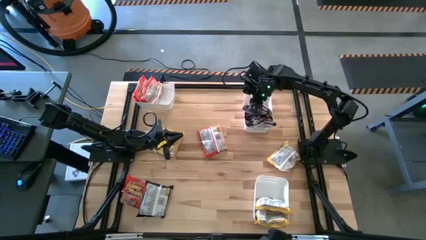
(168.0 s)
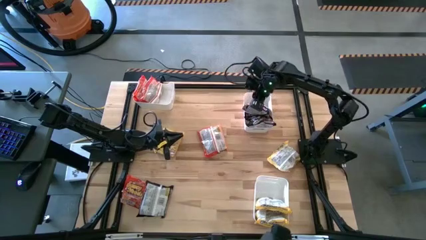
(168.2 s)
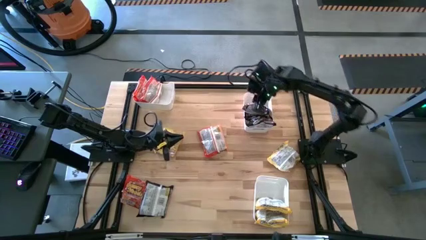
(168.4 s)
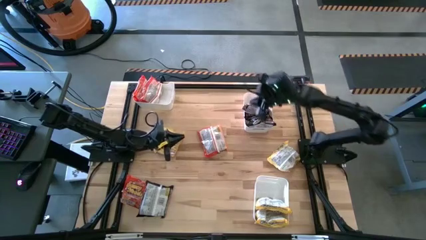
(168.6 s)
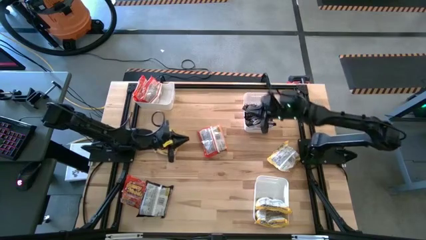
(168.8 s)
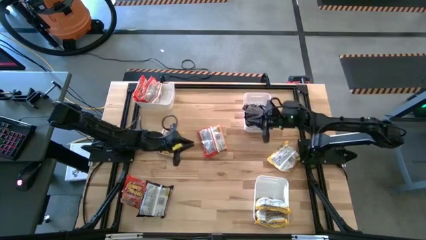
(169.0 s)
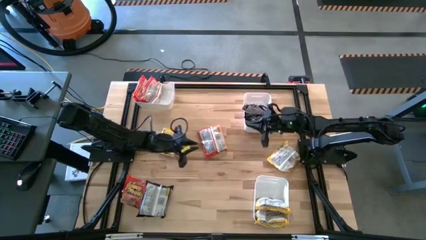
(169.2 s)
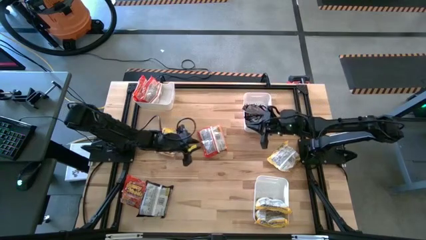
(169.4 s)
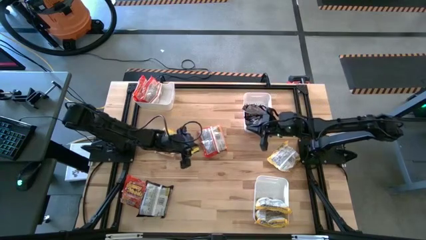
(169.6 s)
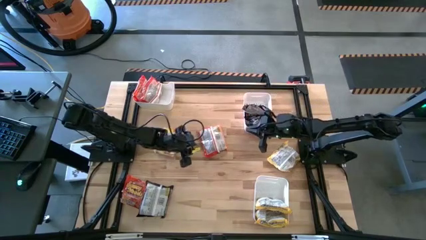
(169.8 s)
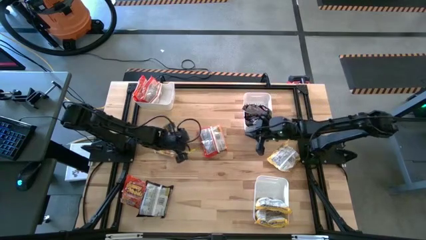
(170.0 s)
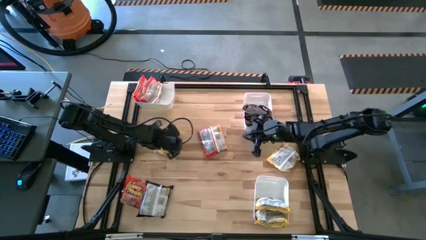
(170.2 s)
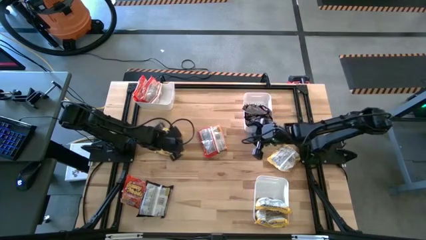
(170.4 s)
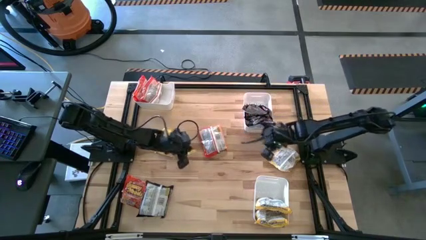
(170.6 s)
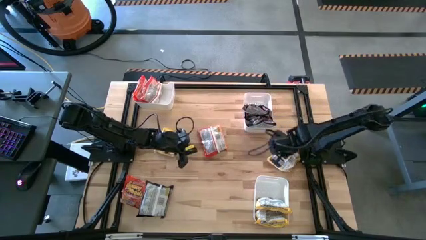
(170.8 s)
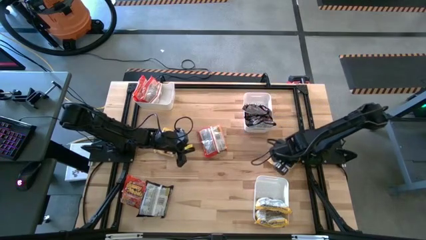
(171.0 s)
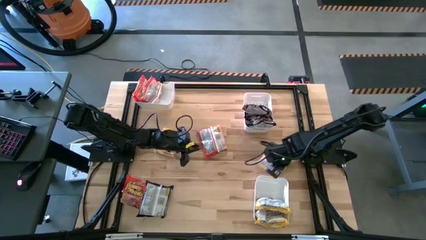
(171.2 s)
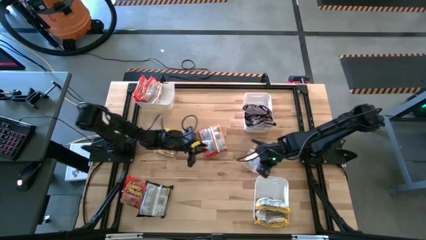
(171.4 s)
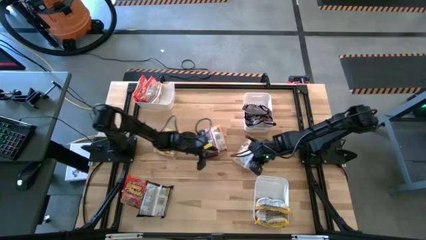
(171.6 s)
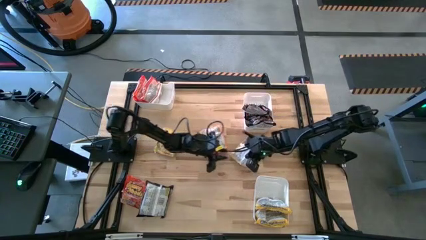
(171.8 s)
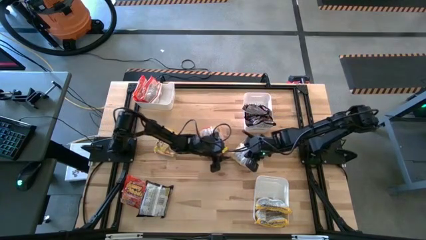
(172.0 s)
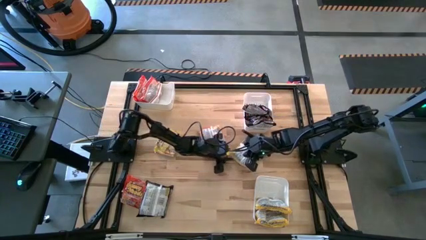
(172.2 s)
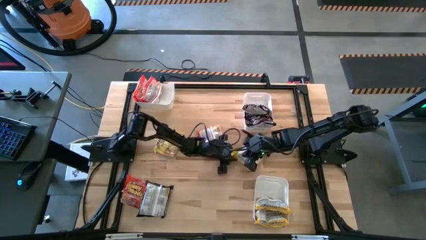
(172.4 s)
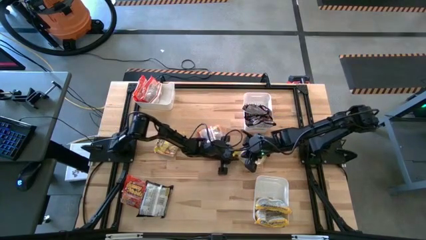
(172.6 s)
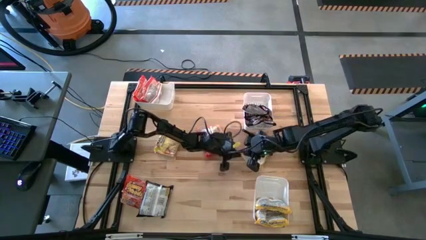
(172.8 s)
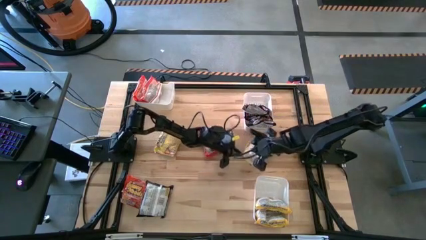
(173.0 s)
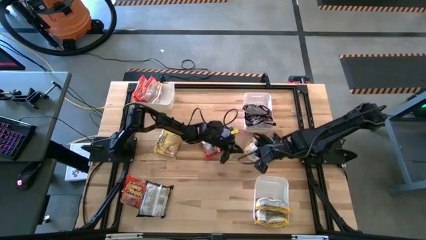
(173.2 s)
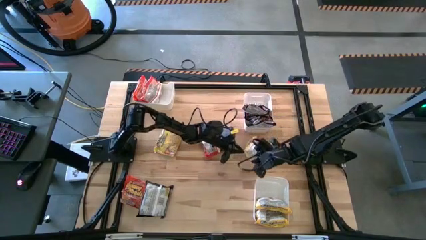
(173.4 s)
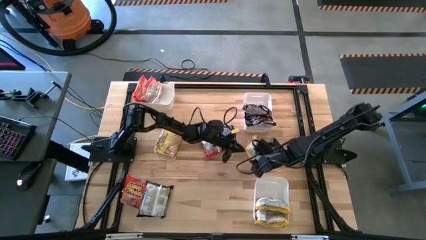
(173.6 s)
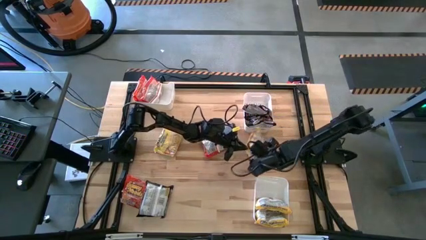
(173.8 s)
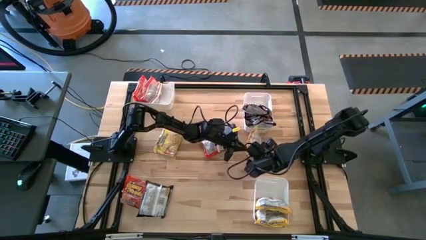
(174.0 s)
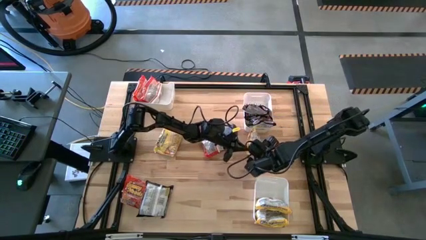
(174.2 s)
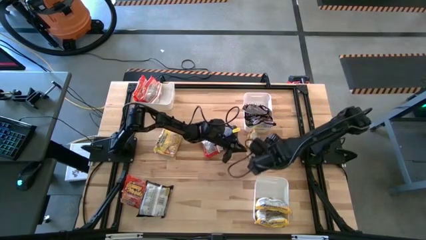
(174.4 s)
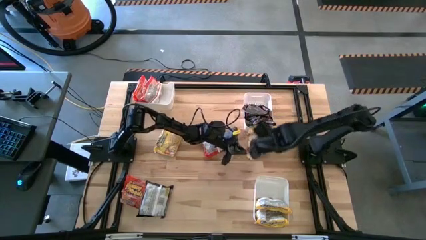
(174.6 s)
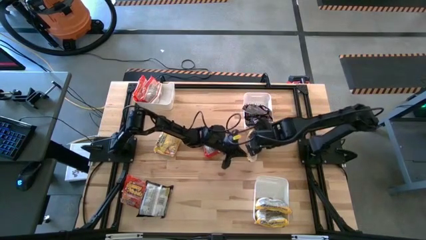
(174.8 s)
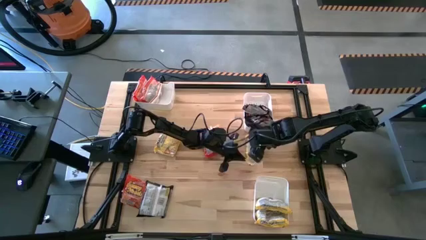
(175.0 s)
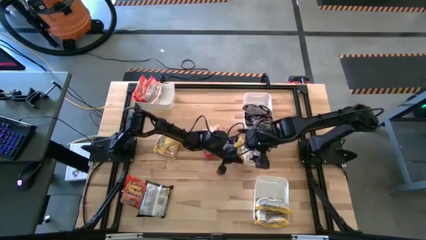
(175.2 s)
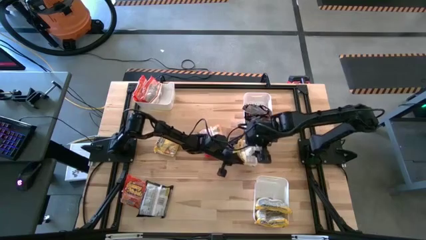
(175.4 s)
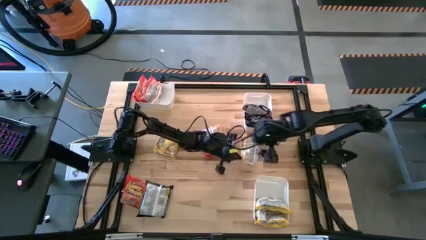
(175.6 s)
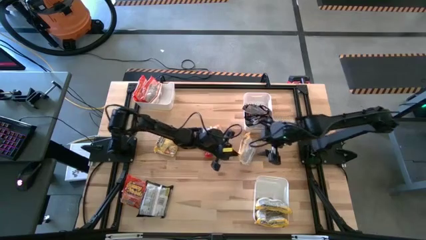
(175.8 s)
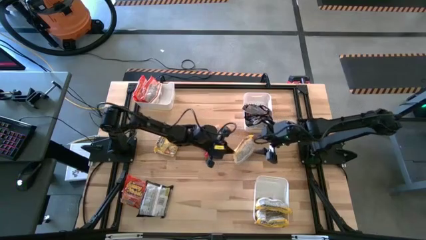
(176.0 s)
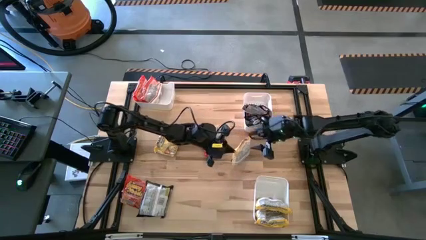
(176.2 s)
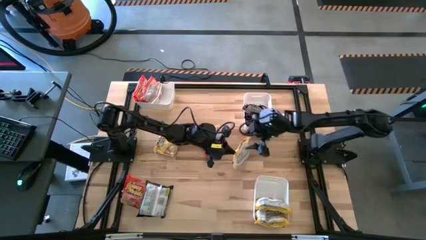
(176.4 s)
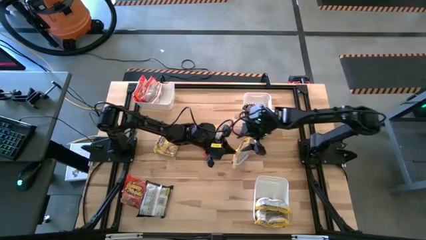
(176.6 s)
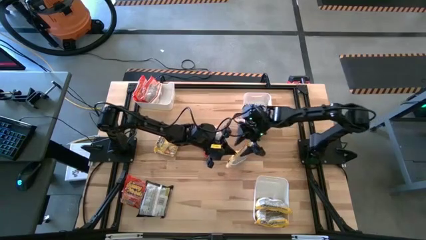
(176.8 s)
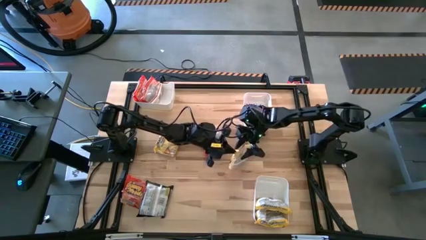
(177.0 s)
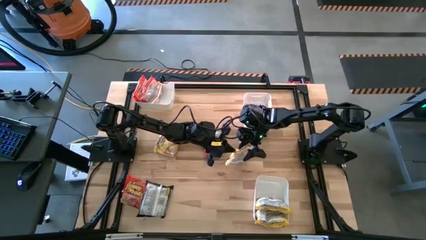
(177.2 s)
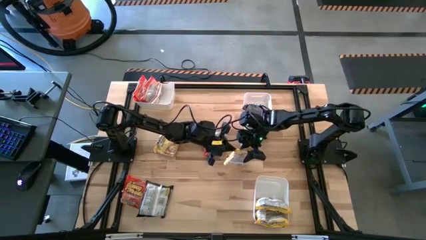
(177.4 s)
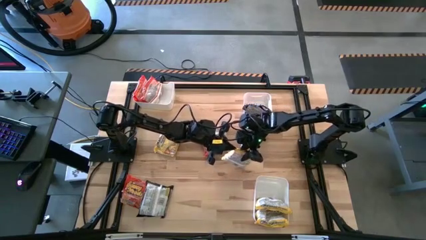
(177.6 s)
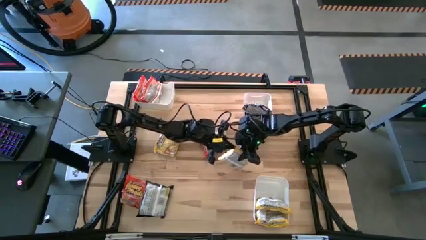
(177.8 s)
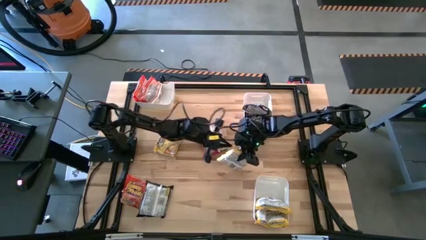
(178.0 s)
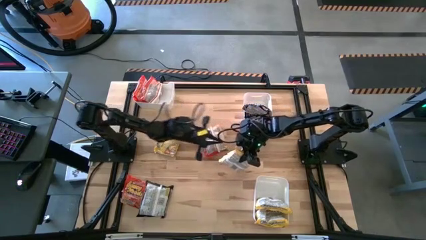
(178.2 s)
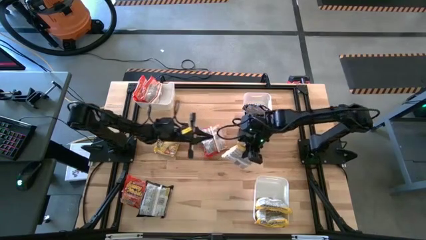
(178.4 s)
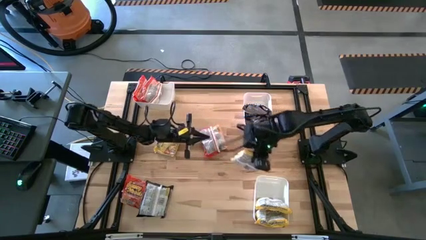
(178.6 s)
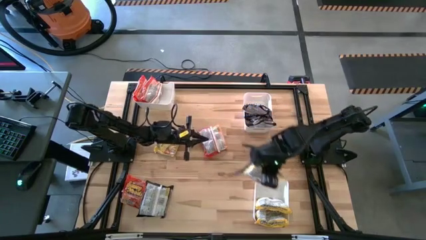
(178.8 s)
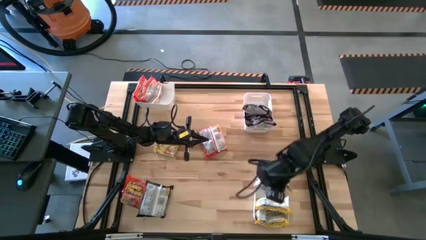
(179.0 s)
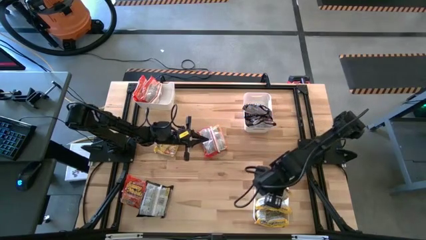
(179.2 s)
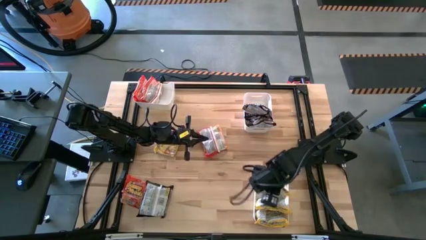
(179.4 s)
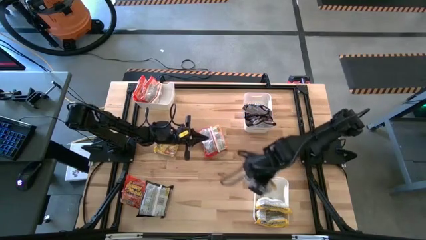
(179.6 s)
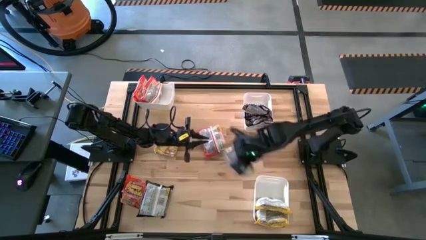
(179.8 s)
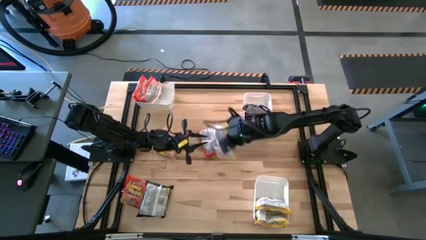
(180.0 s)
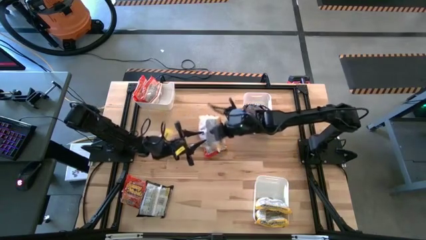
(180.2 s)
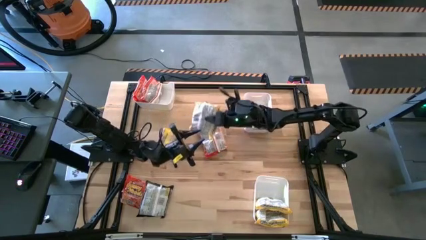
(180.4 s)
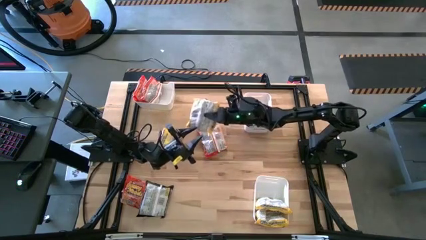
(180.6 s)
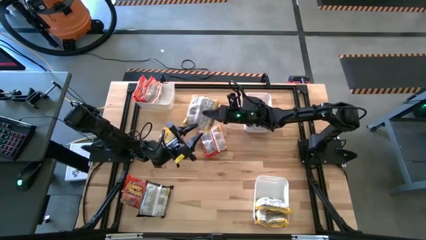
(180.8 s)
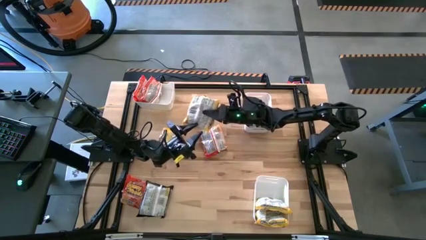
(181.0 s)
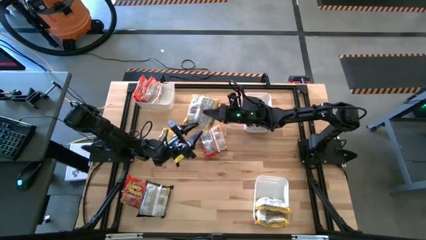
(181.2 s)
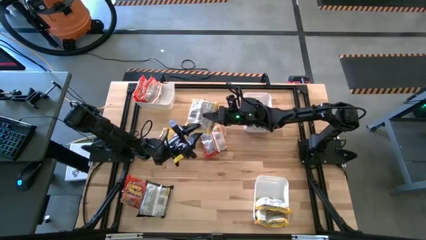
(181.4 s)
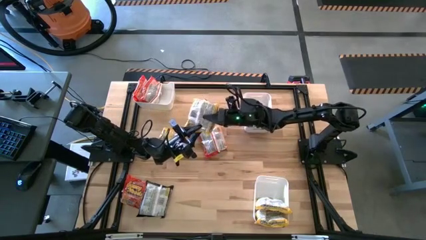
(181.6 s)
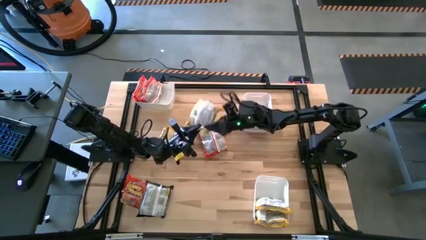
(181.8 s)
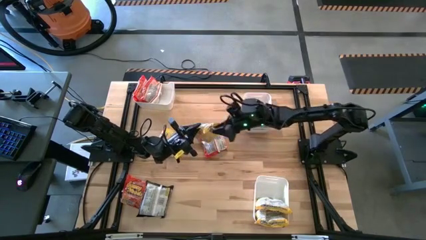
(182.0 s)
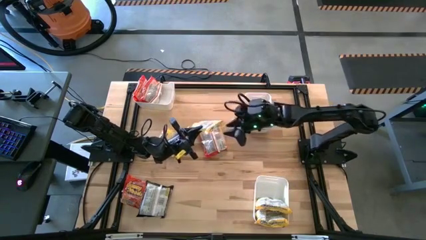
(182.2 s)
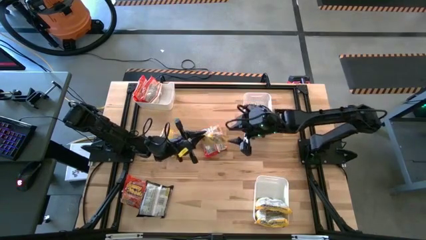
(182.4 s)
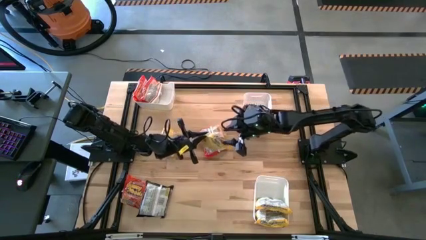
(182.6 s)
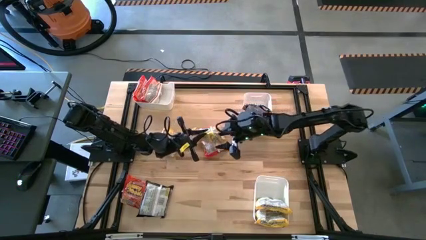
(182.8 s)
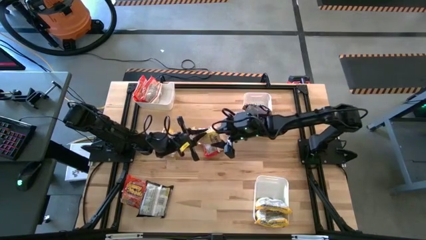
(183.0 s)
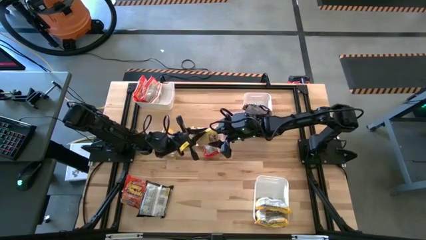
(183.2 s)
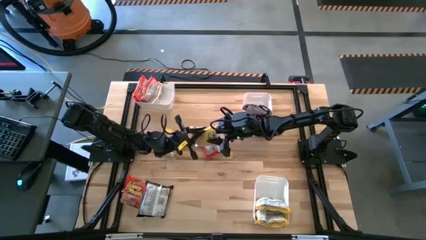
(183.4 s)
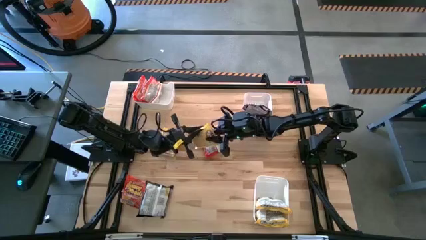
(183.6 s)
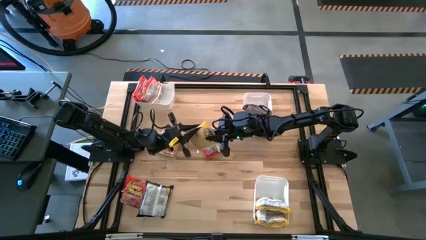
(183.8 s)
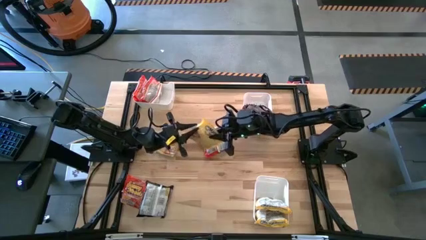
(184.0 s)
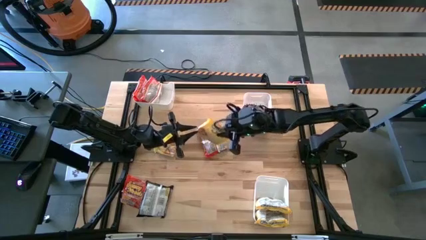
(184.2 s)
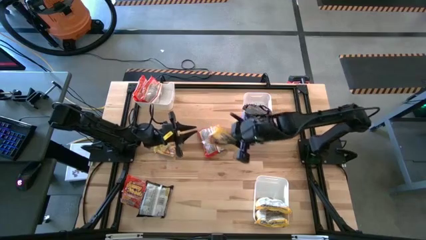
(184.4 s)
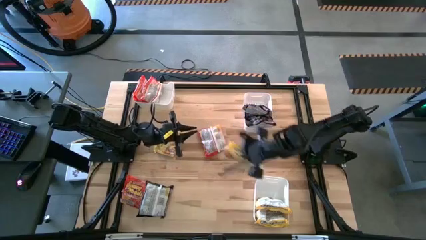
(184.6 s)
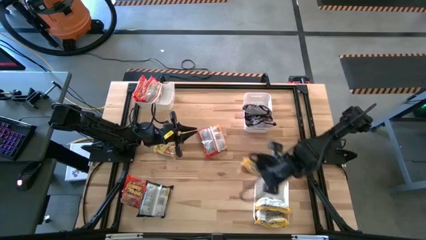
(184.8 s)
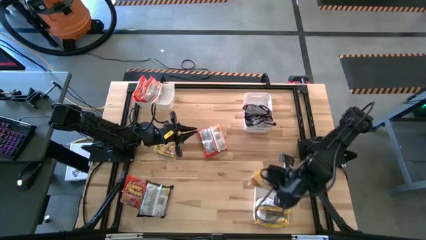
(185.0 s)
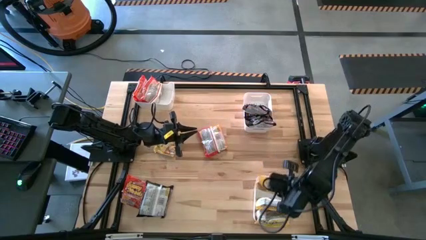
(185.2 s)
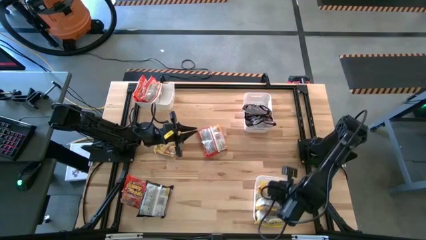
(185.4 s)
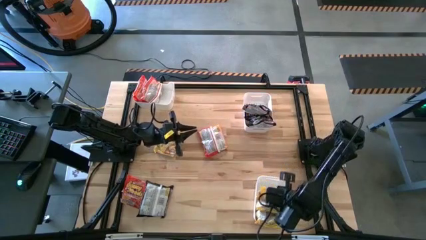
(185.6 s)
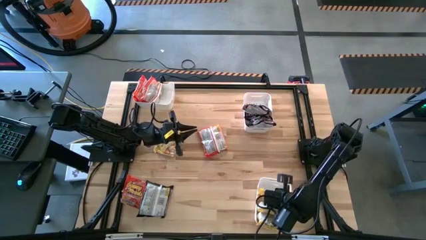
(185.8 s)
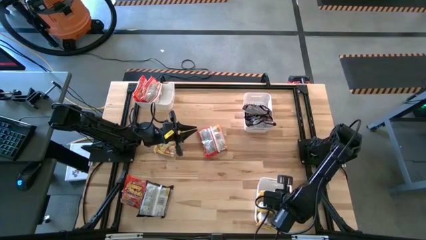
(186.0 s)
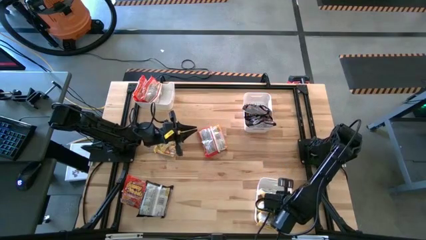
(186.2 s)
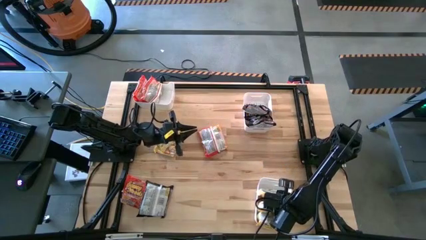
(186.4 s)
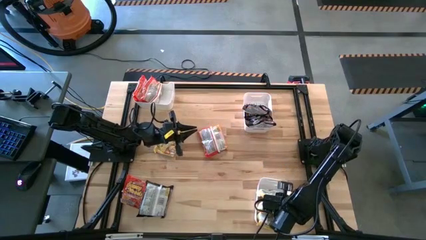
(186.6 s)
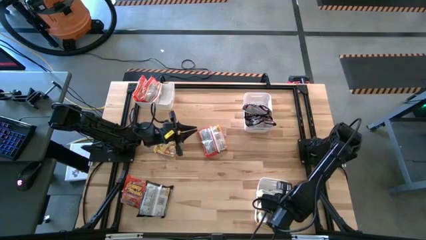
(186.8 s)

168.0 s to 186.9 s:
Task: Sort Maruchan noodles
Put the yellow noodle pack into the bottom white bin
